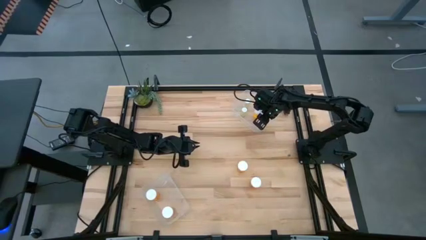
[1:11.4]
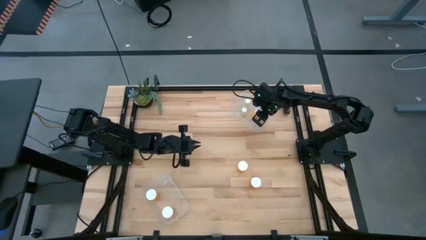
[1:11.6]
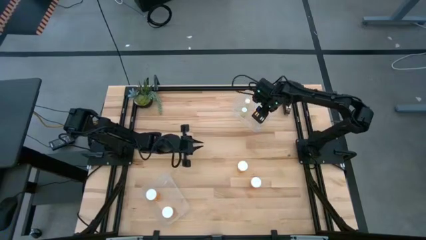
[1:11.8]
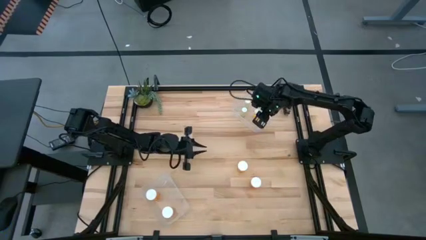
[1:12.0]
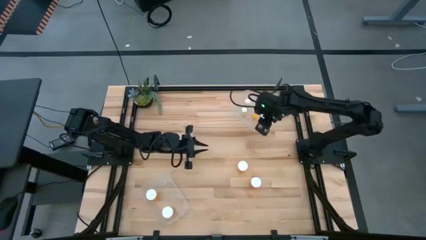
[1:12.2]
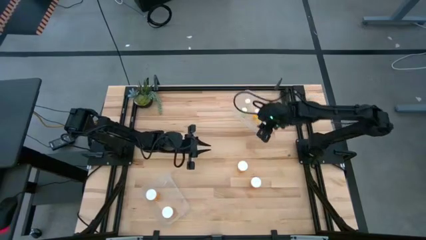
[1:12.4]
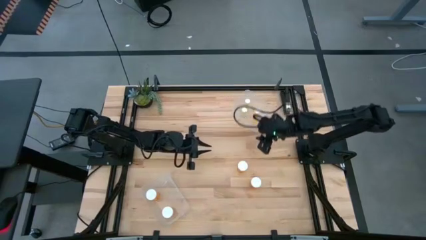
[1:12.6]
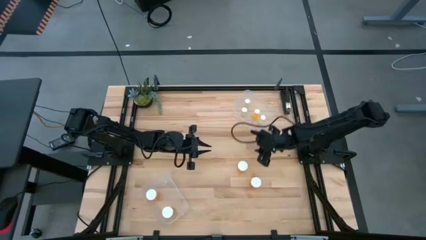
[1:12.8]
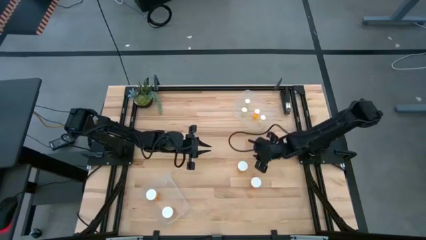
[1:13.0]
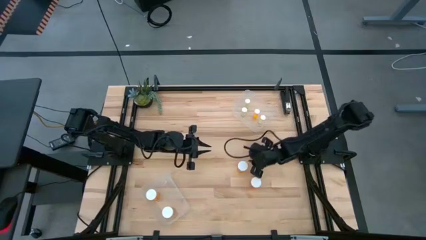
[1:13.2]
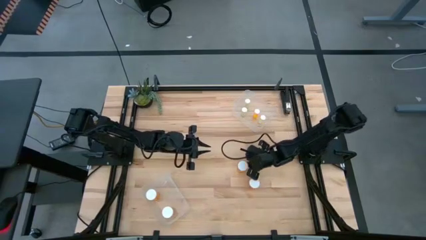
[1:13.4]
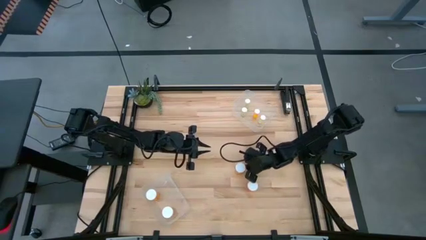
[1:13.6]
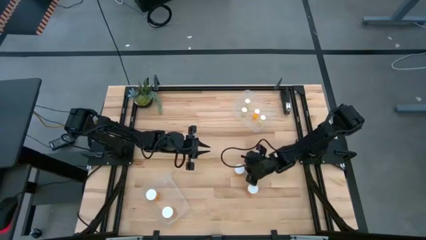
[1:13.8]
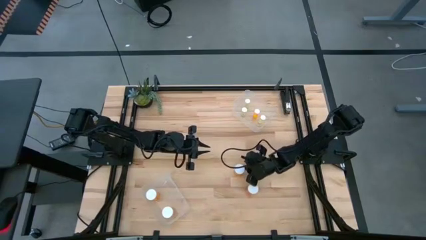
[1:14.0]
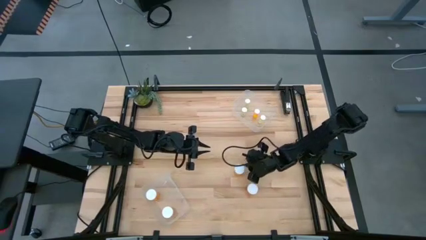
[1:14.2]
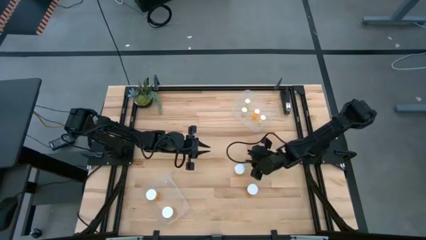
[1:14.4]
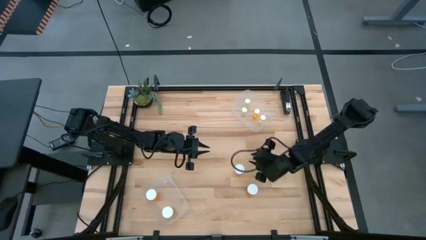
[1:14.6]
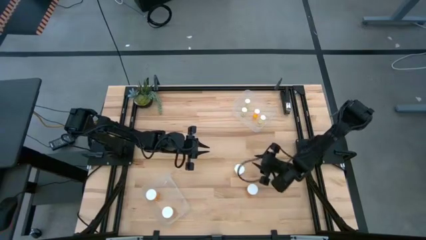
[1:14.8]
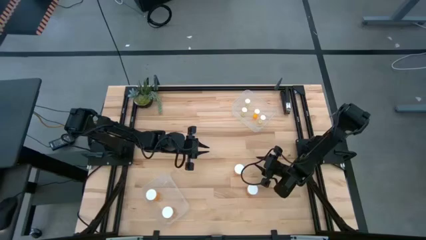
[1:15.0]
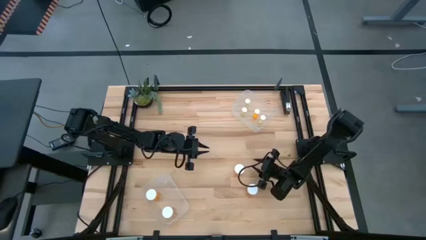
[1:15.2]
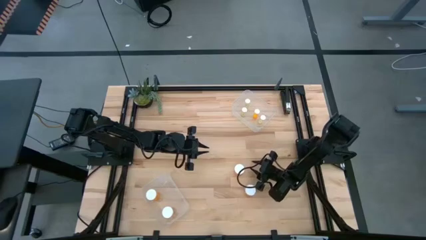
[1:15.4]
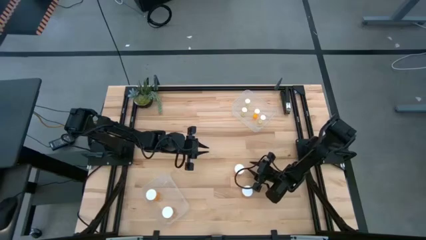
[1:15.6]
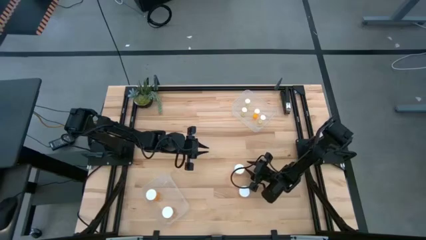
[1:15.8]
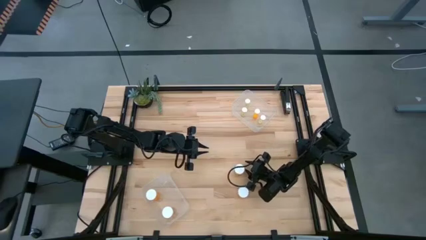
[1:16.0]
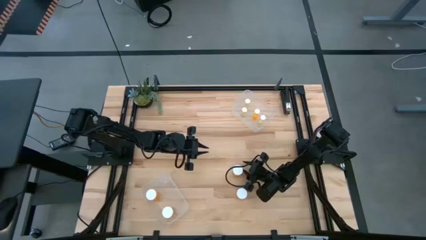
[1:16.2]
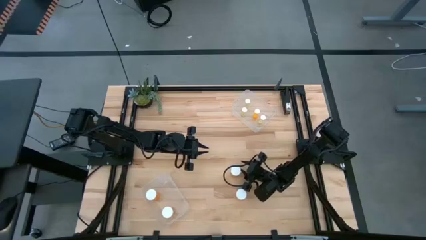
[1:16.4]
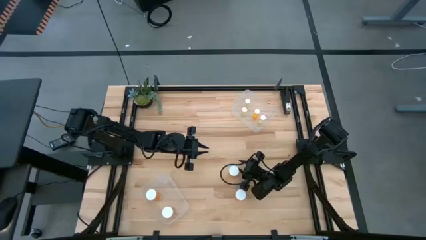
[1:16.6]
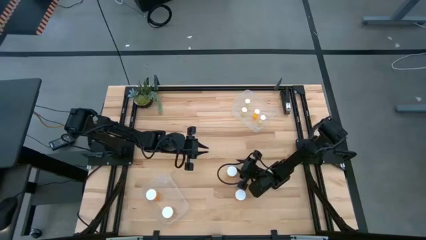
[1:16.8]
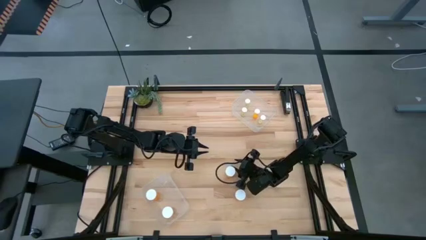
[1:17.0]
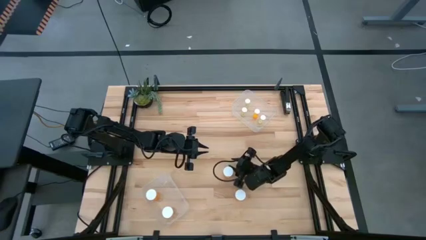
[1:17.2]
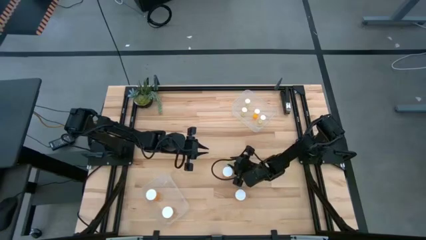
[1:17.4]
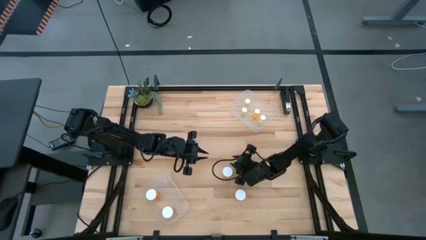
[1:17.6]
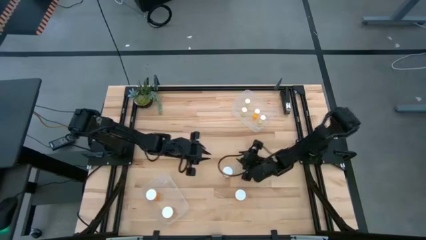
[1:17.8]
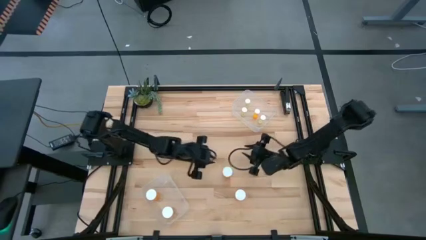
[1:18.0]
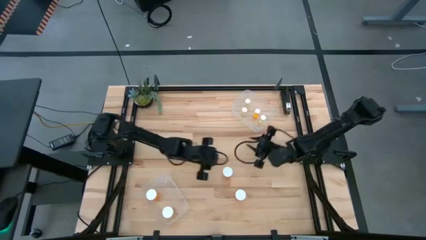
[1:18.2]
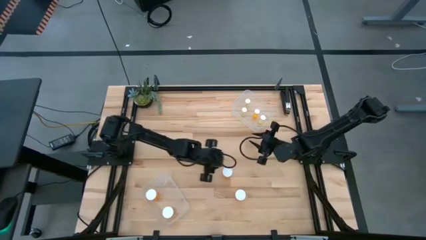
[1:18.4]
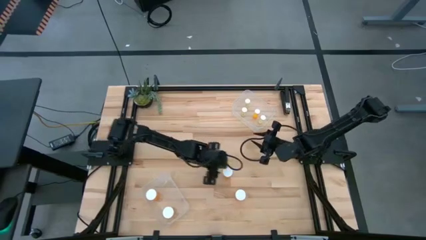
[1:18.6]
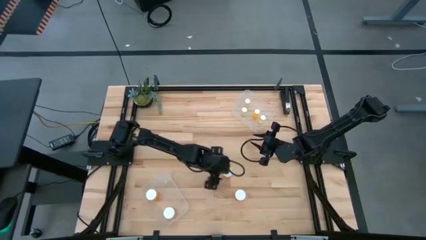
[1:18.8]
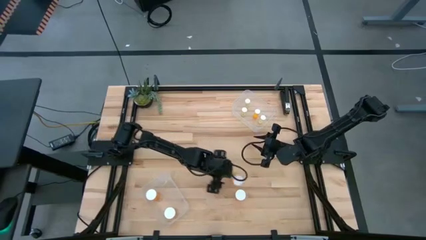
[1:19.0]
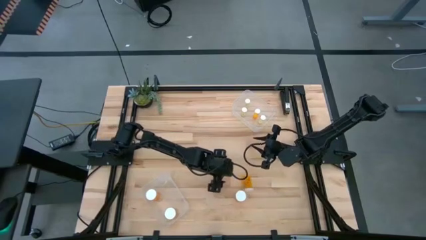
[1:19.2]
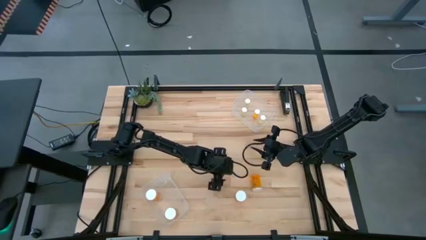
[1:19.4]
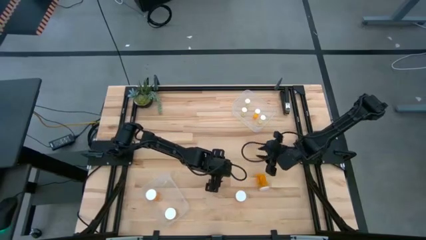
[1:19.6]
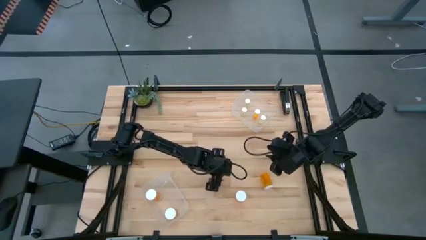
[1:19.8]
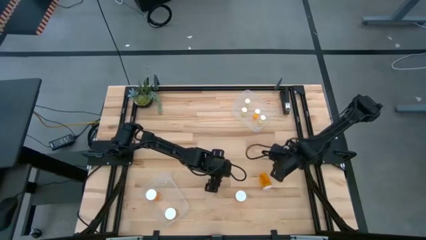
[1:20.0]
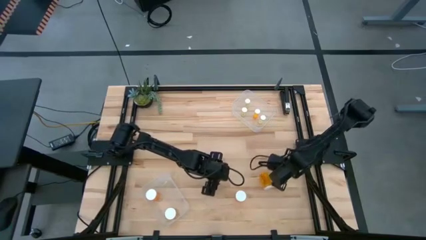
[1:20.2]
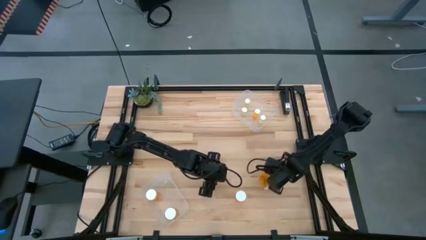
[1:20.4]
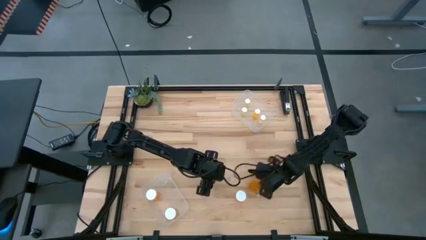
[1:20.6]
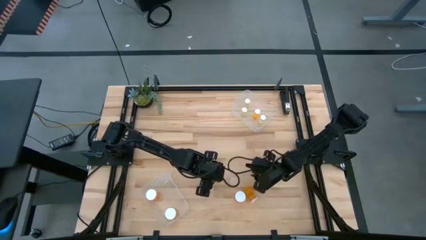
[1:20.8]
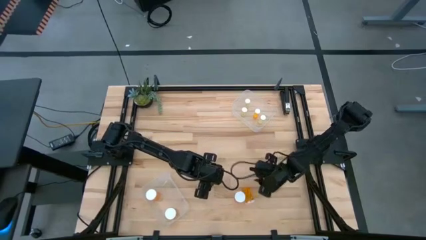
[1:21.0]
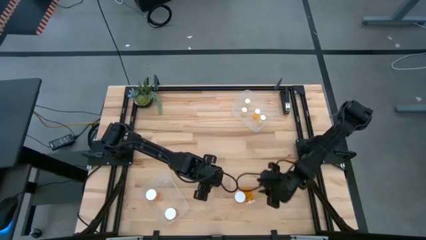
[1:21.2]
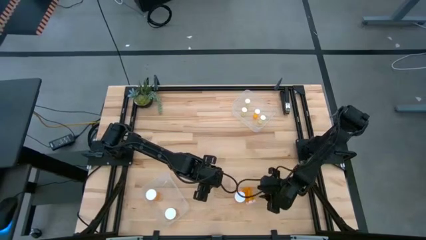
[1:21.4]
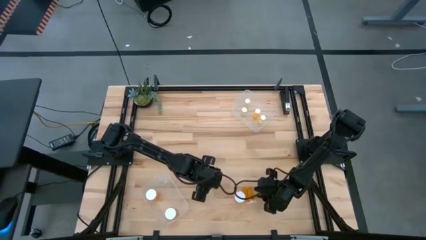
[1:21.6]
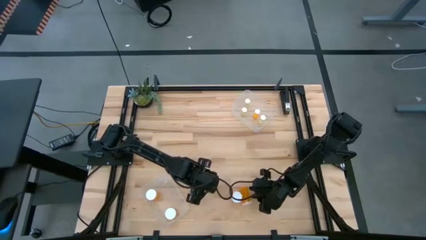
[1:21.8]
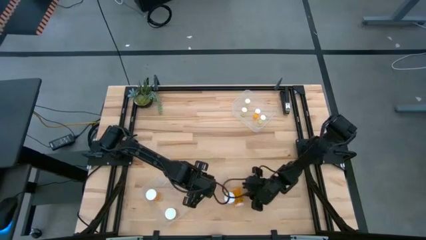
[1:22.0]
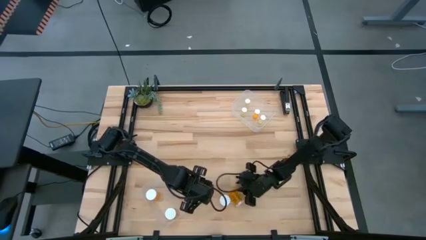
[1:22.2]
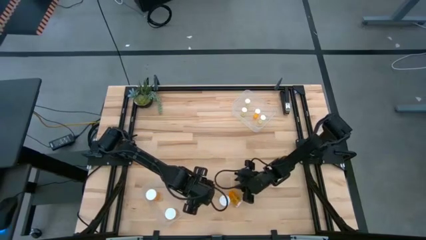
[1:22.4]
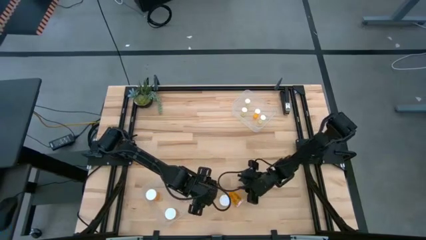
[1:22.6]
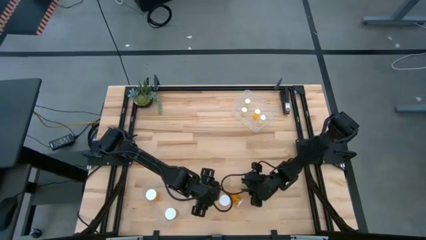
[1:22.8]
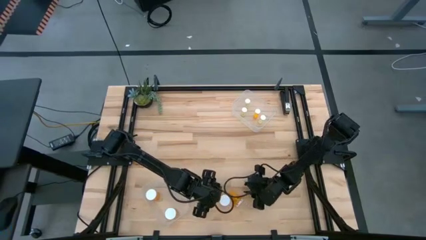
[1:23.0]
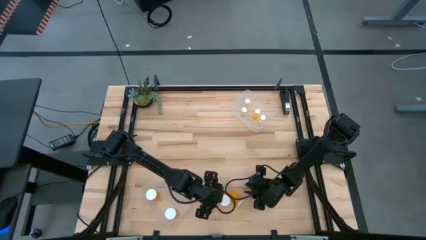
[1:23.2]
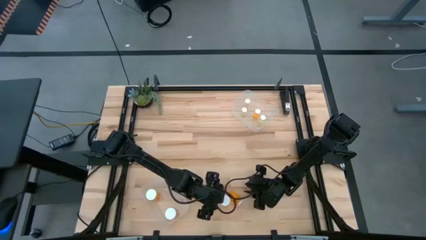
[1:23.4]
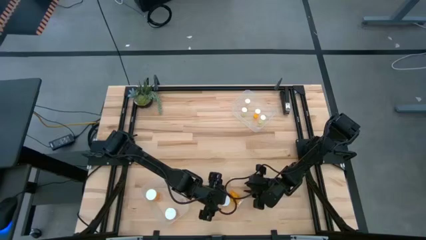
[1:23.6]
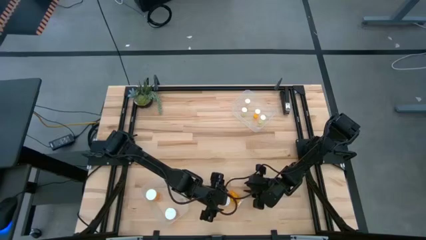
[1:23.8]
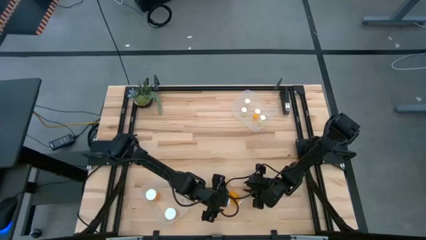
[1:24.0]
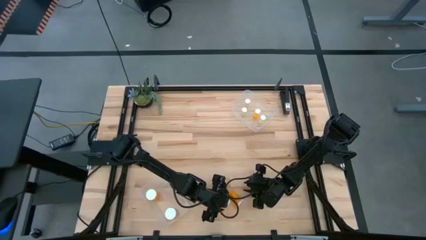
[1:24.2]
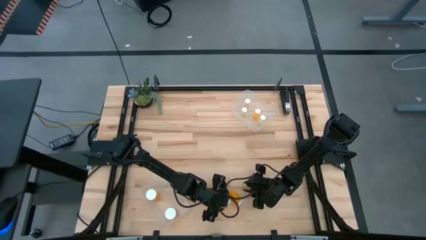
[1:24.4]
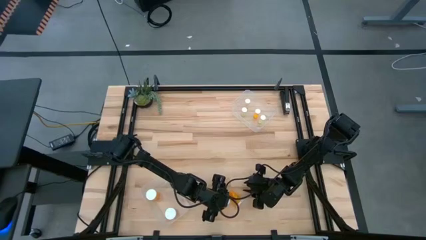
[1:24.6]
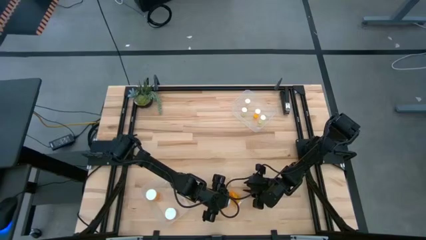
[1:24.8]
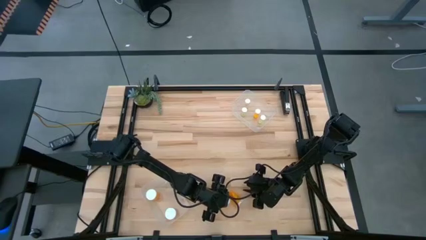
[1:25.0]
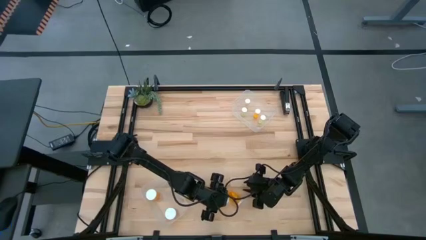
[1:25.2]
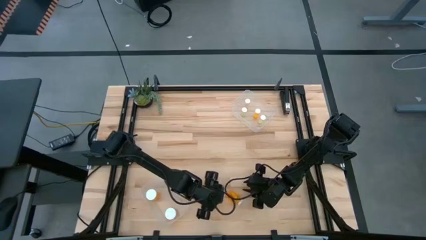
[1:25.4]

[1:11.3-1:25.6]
Task: Pick and place medicine bottles into bin by pill shape (circle, oval)
Put the big orange pill bottle into the bottom transparent bin
